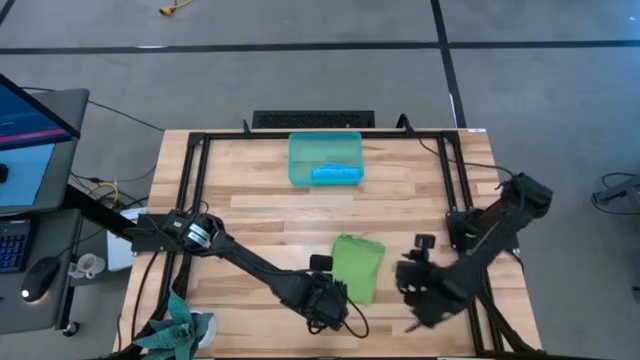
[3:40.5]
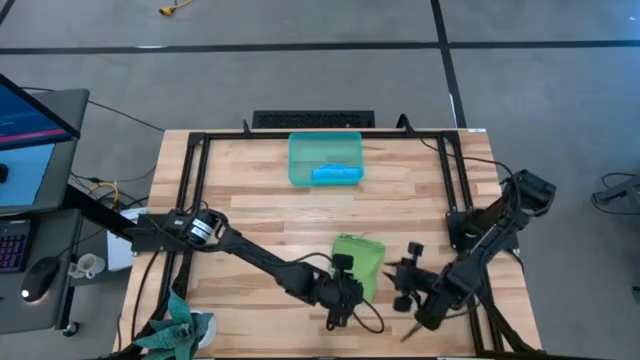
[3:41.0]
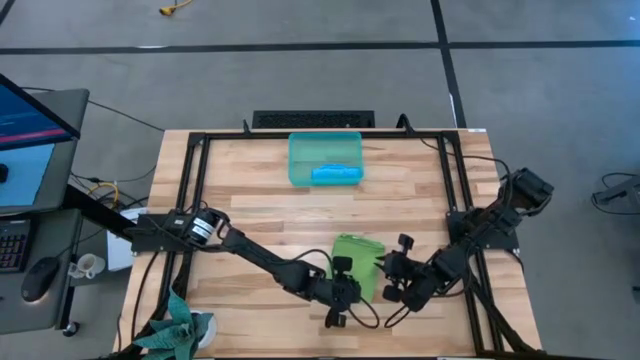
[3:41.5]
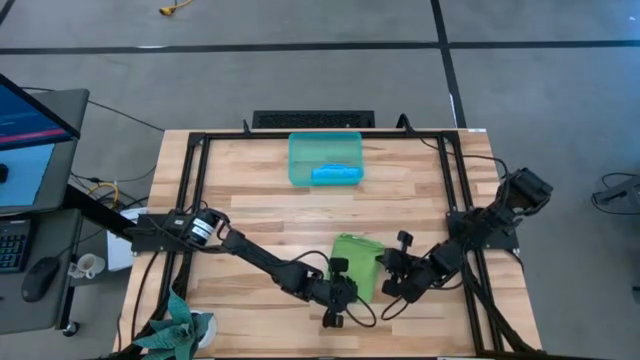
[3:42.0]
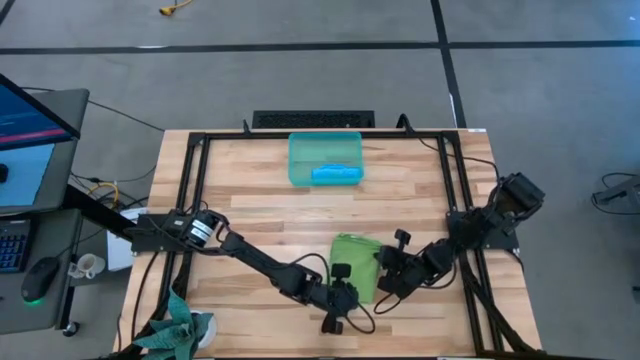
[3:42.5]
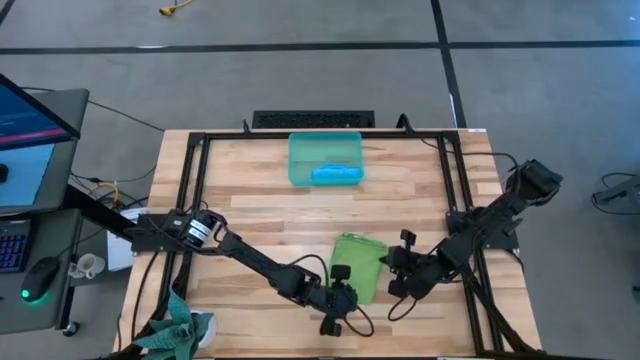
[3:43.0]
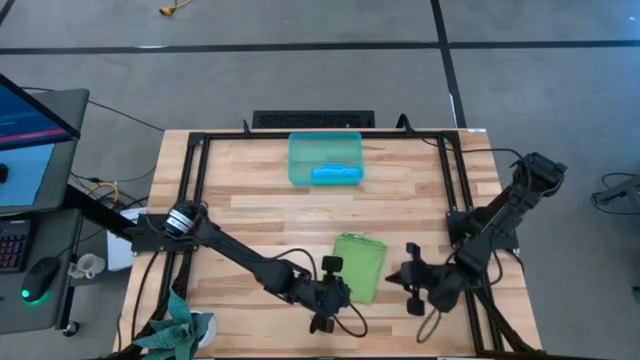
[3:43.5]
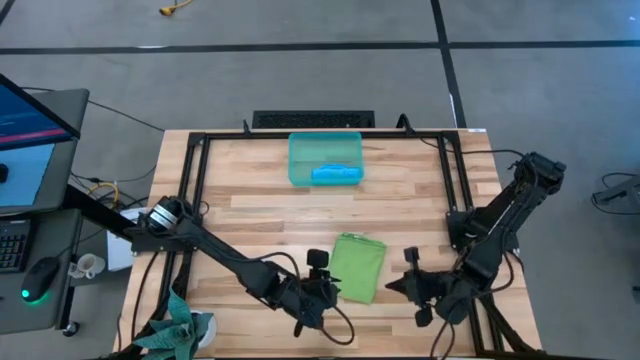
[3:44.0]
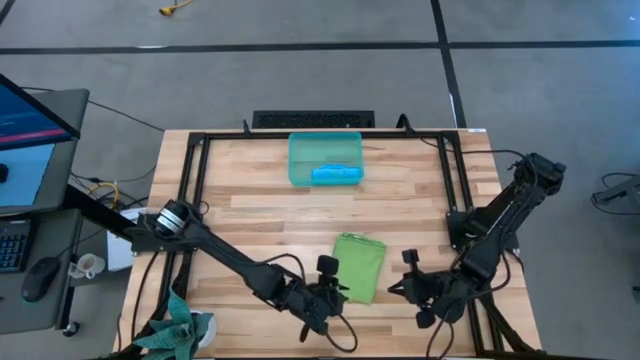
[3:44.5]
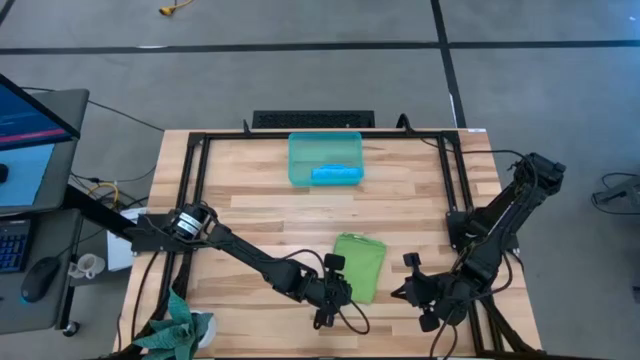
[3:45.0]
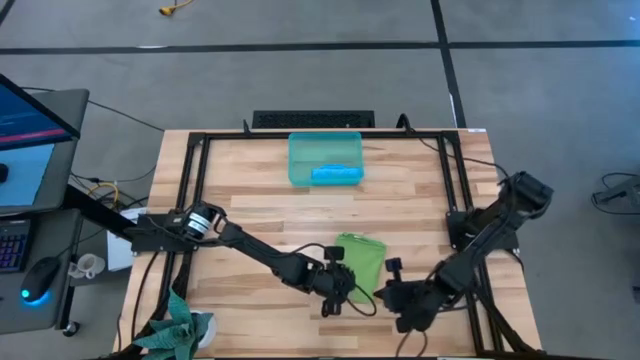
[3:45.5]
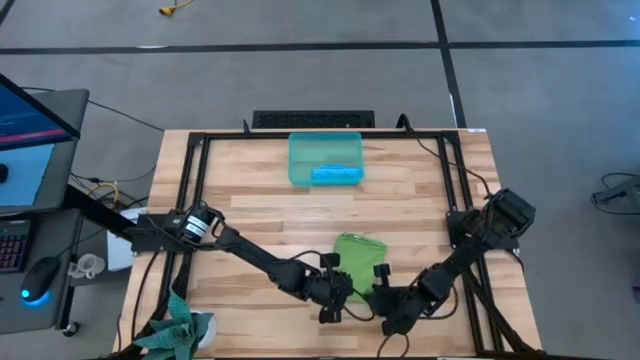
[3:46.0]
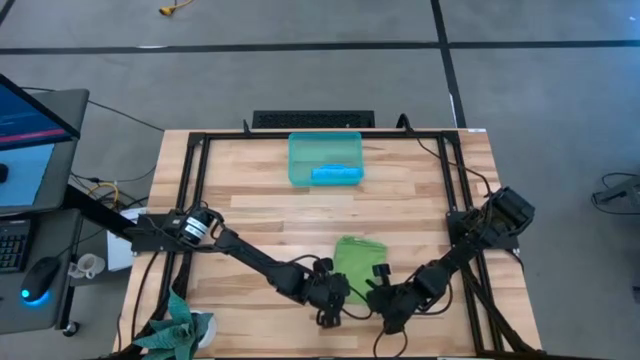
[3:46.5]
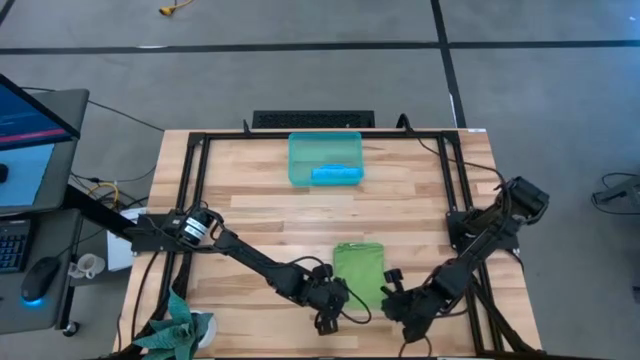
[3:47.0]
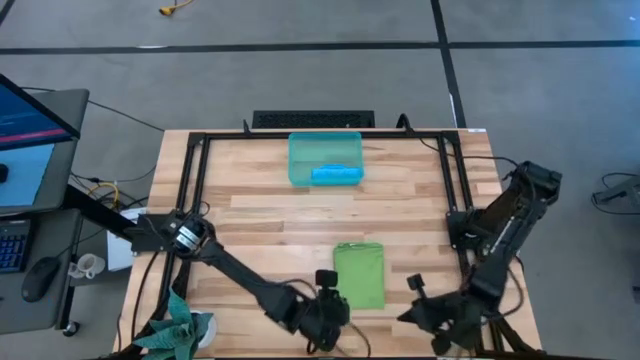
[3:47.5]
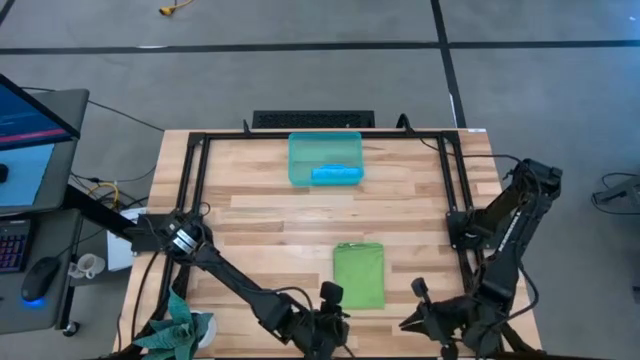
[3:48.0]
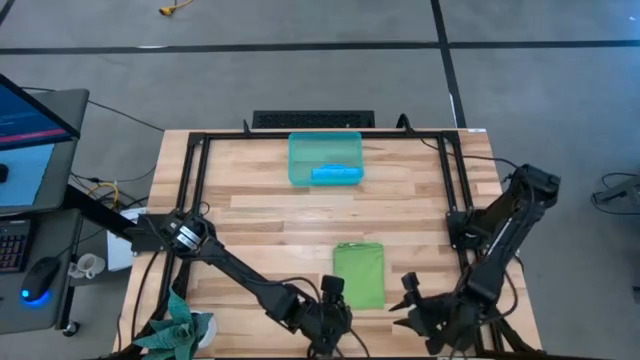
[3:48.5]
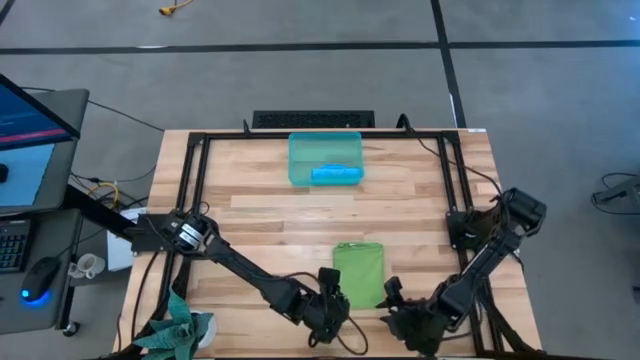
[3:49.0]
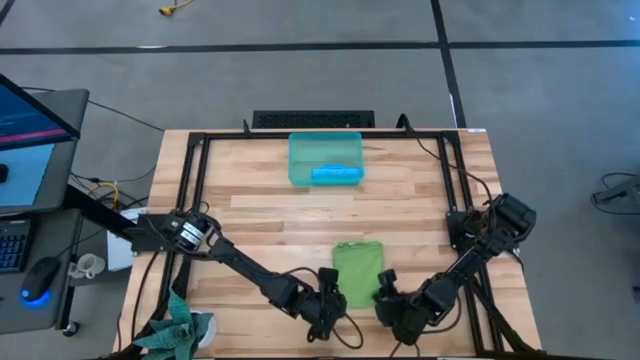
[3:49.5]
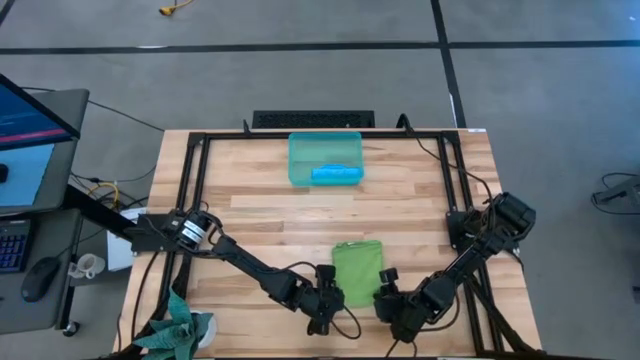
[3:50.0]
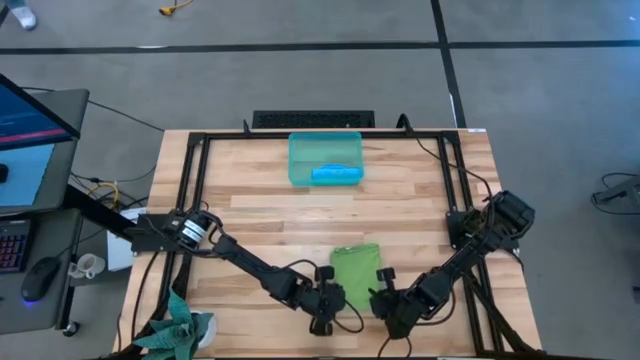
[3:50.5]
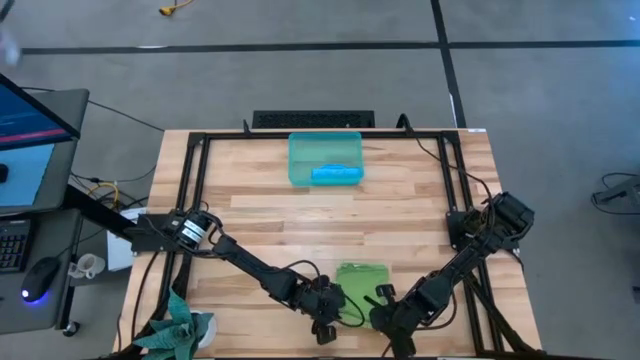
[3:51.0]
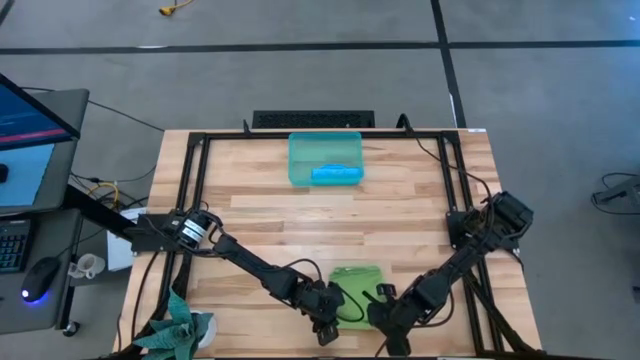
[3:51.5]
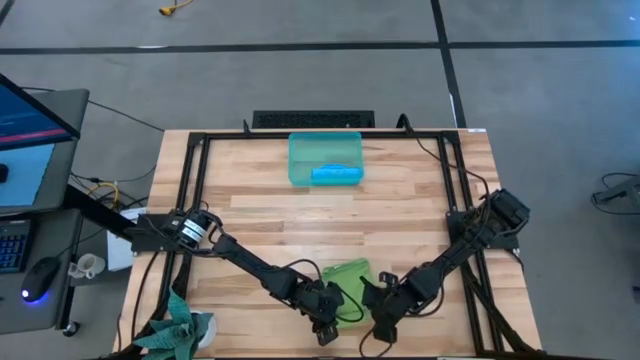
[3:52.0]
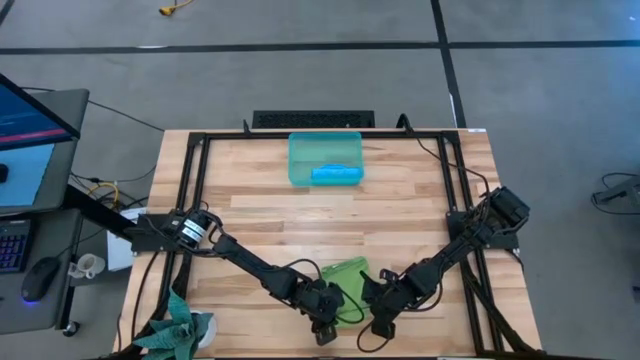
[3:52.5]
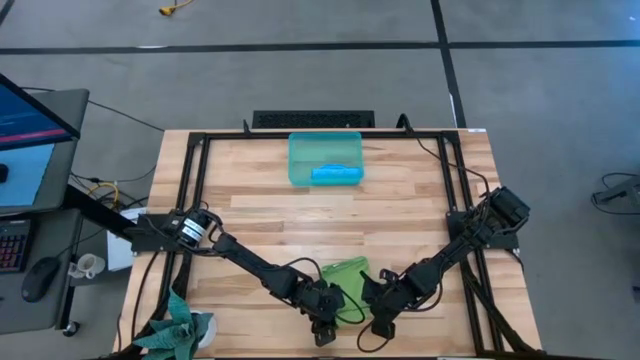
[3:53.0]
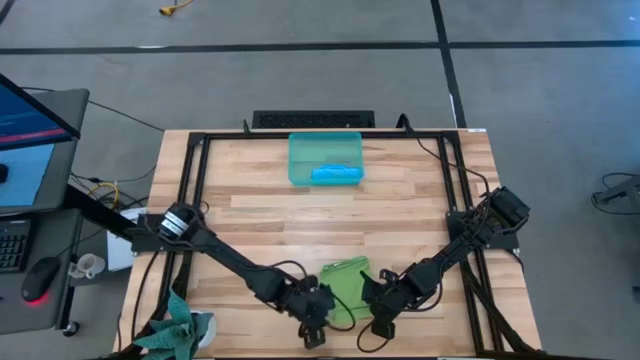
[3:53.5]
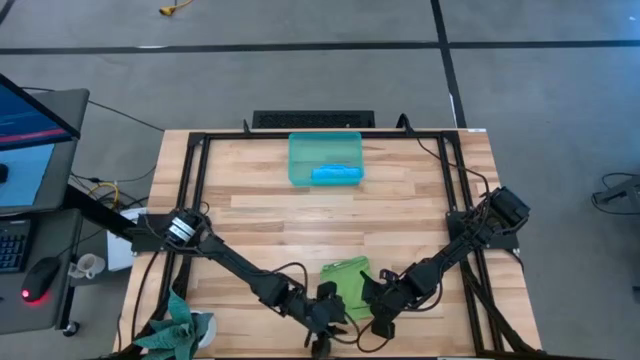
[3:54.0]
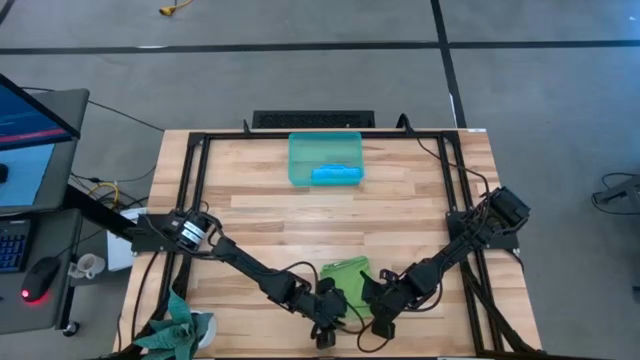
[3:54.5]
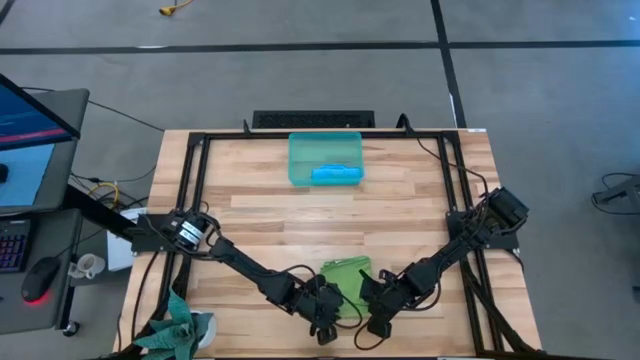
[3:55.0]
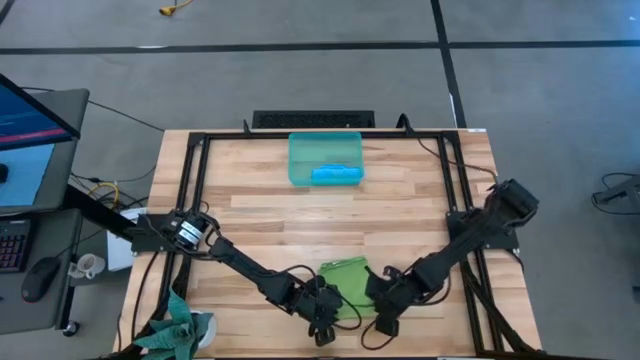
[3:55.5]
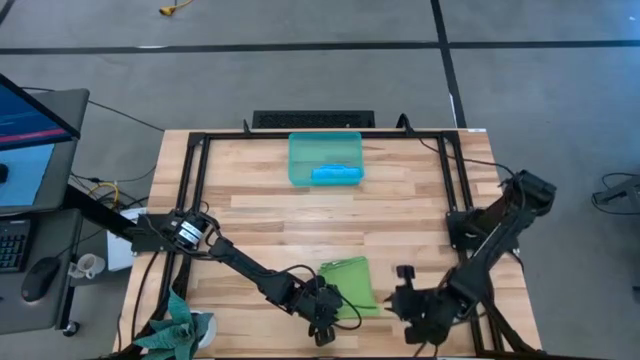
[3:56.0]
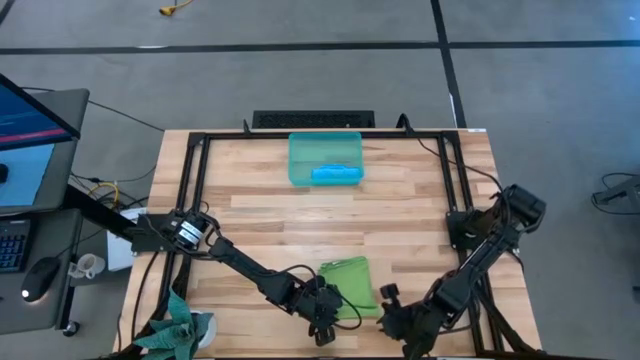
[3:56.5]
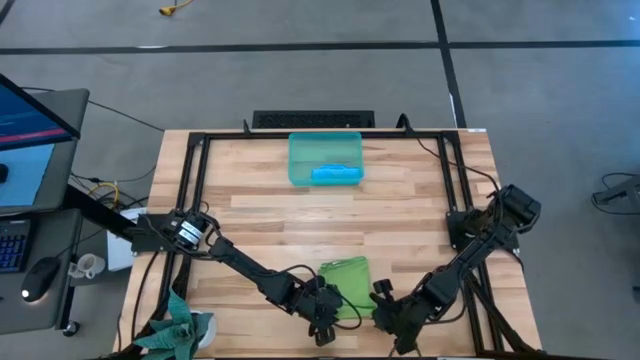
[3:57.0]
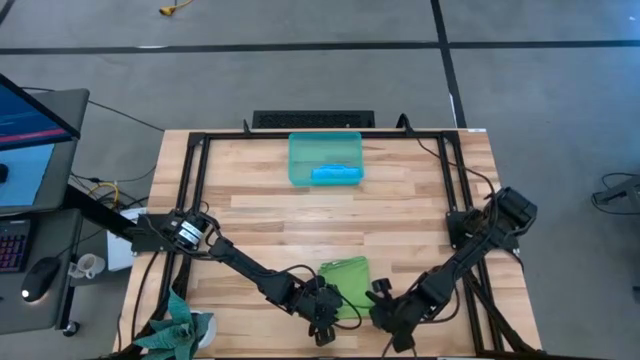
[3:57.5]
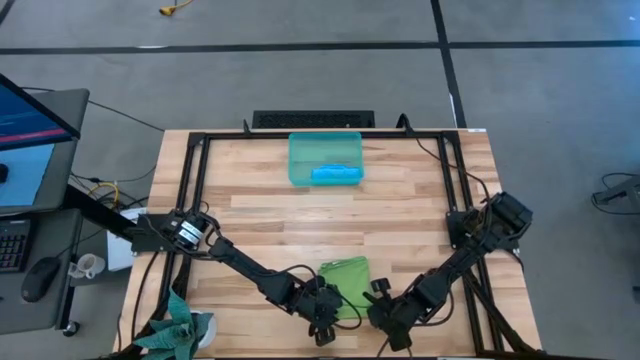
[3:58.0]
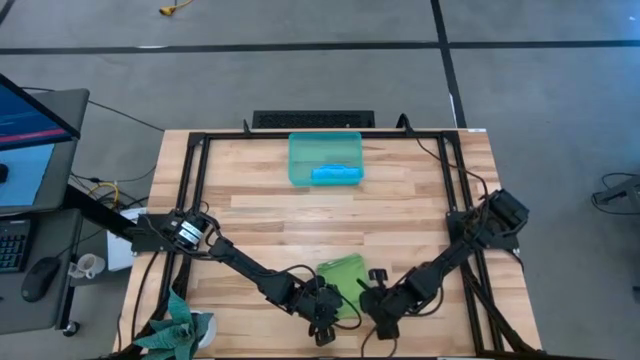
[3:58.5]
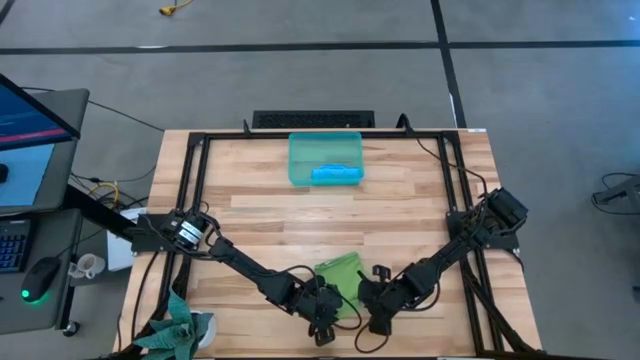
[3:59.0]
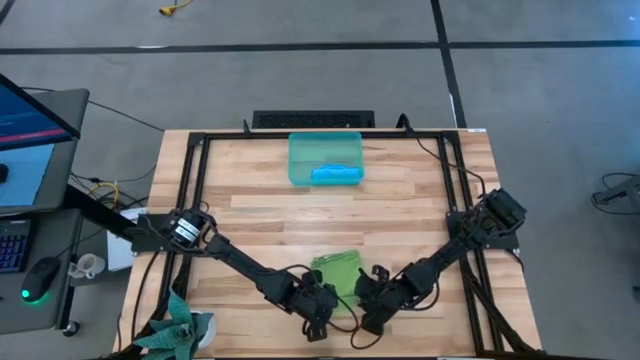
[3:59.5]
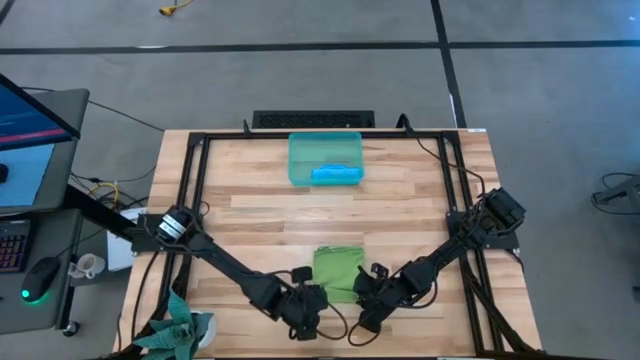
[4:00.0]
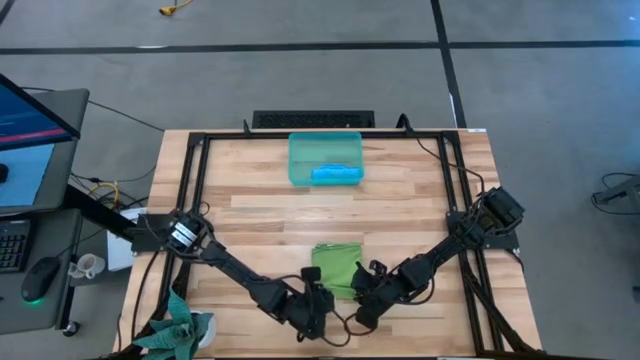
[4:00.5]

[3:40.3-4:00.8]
Task: Roll microfiber towels into tight, uniform cylinder then place into a basket
Roll the green microfiber cloth

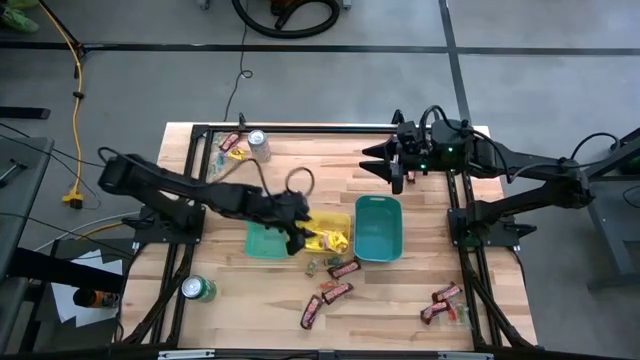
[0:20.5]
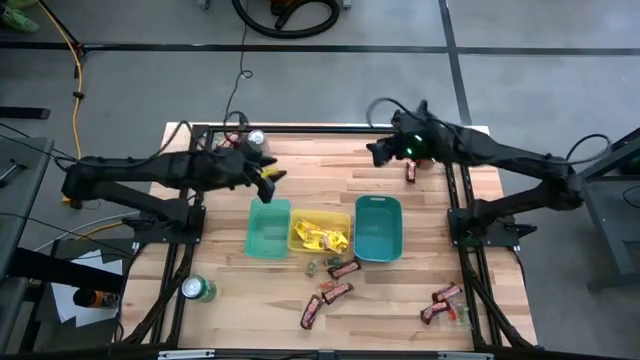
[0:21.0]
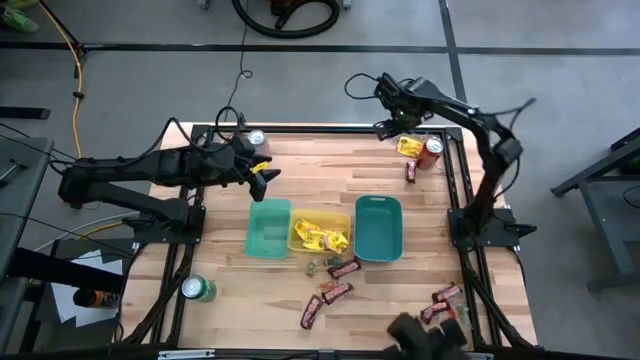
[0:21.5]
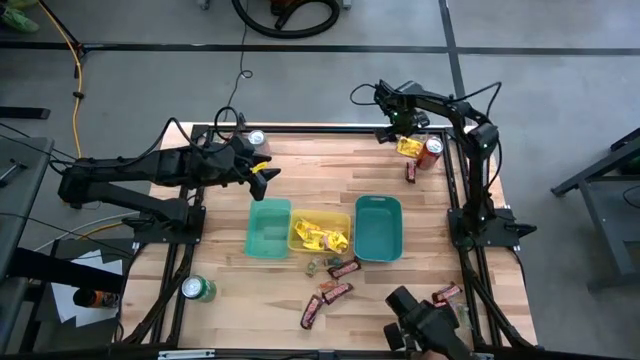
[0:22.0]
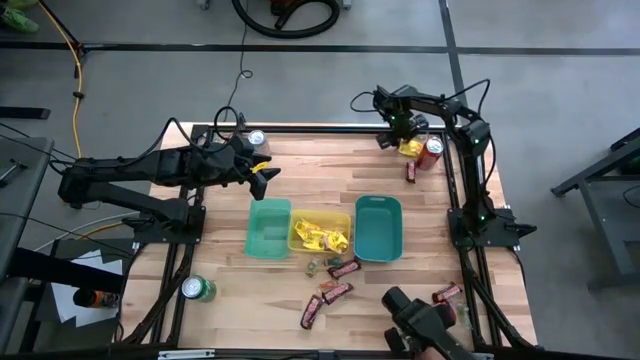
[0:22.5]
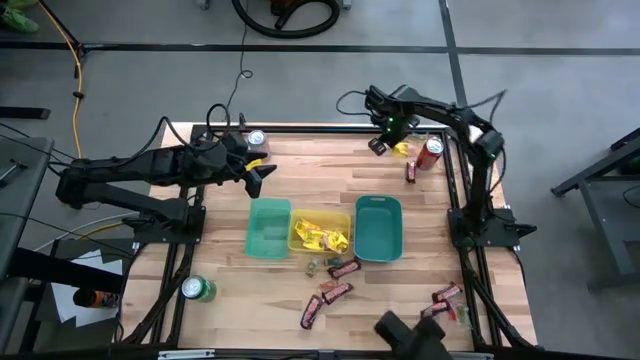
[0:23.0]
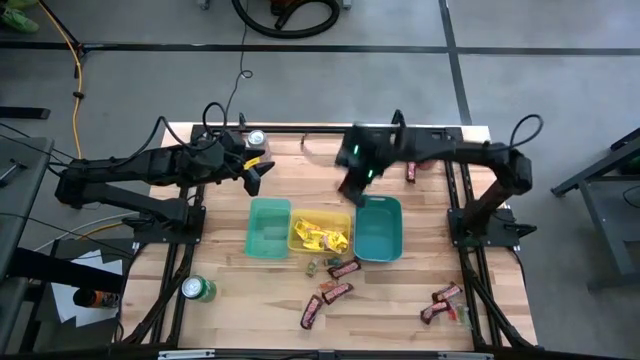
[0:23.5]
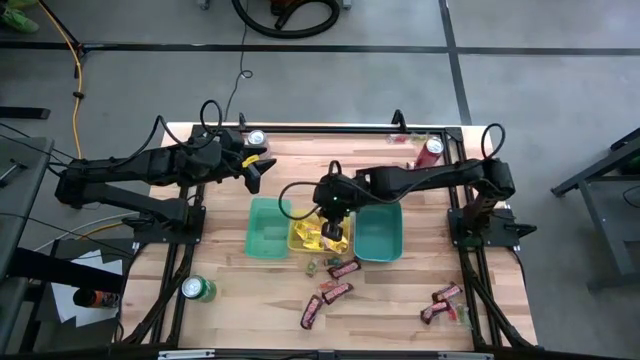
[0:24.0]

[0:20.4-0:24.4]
Task: Sort candy
Put the yellow candy into the yellow bin
